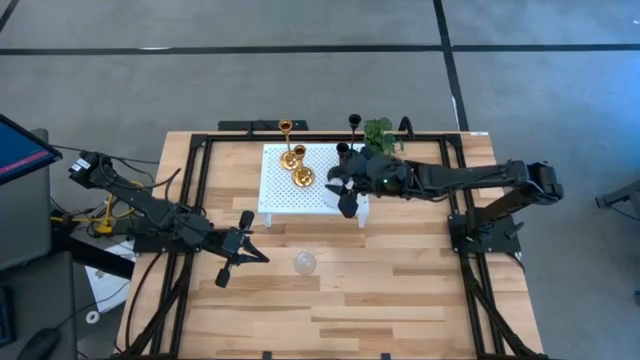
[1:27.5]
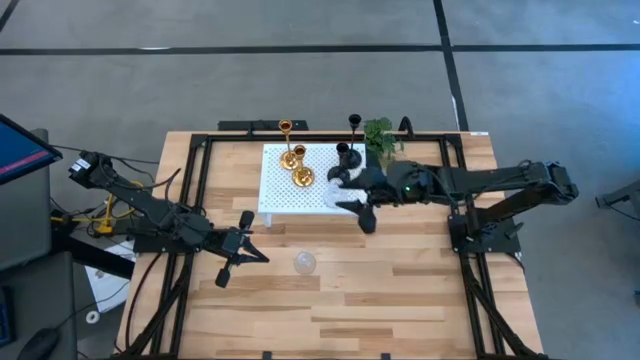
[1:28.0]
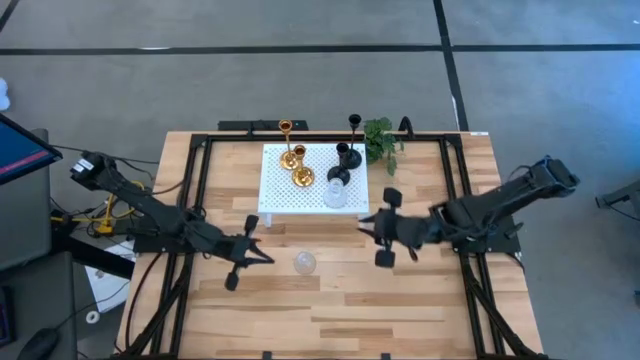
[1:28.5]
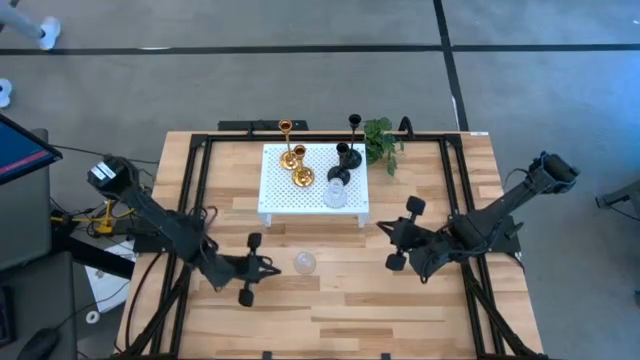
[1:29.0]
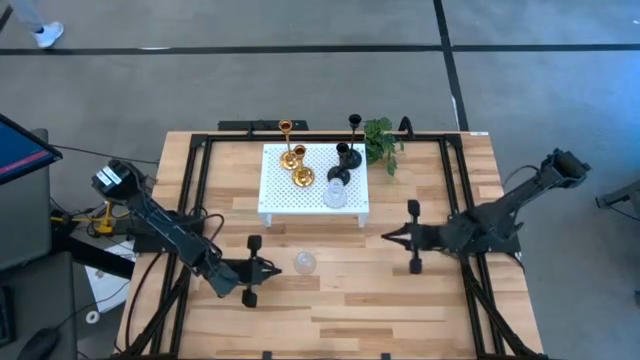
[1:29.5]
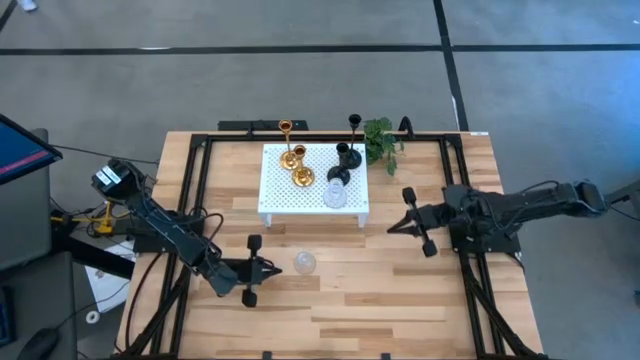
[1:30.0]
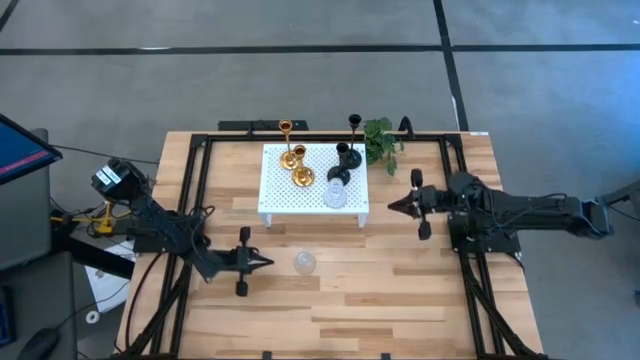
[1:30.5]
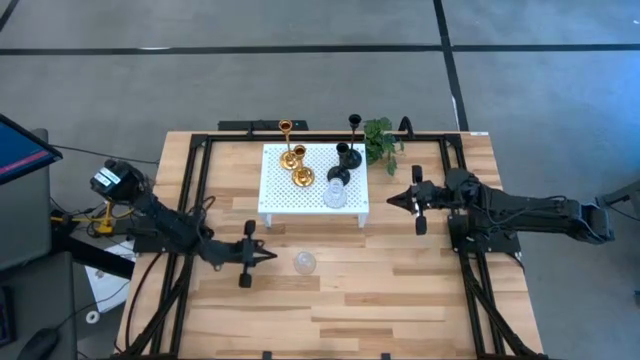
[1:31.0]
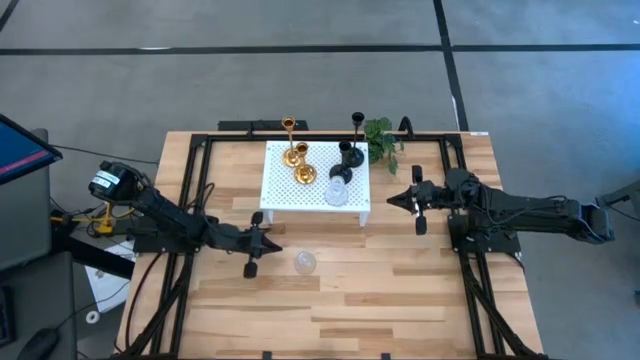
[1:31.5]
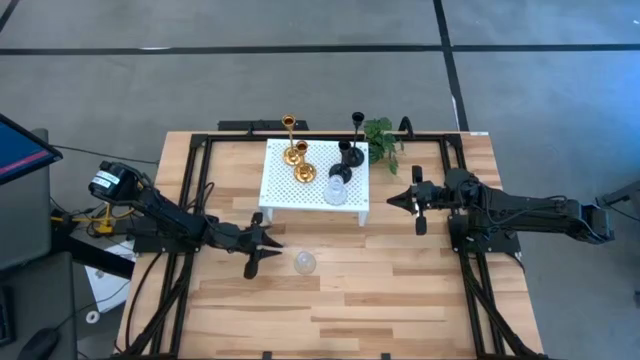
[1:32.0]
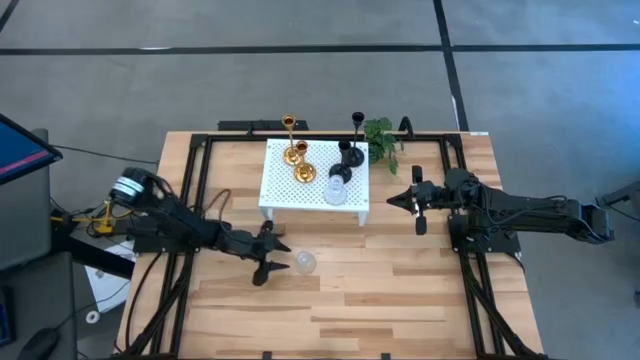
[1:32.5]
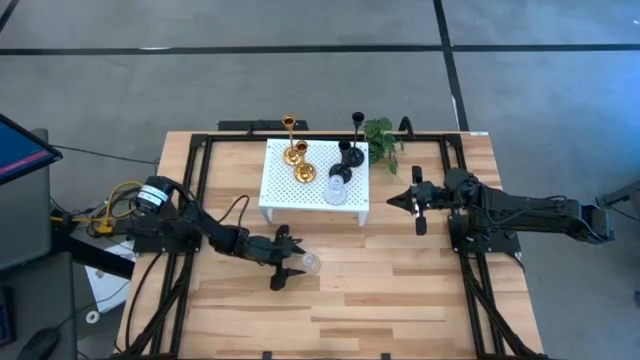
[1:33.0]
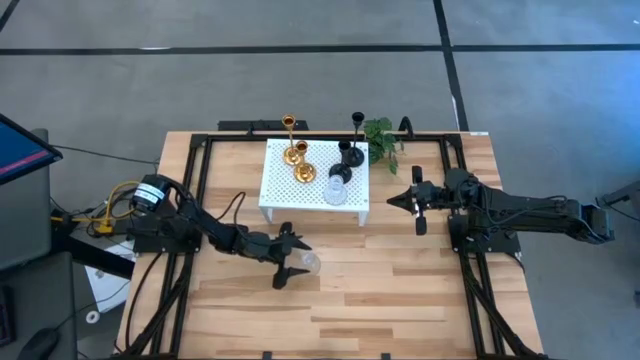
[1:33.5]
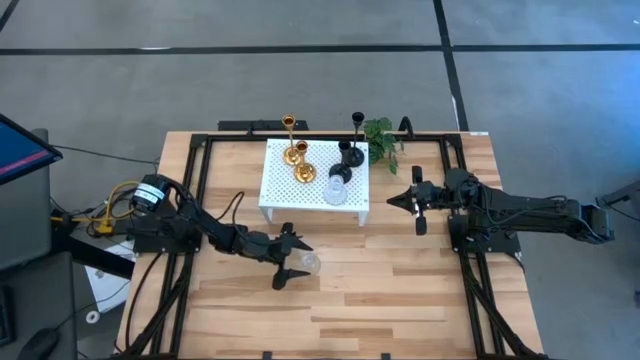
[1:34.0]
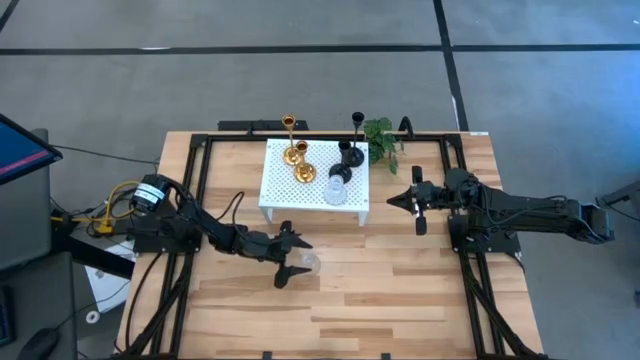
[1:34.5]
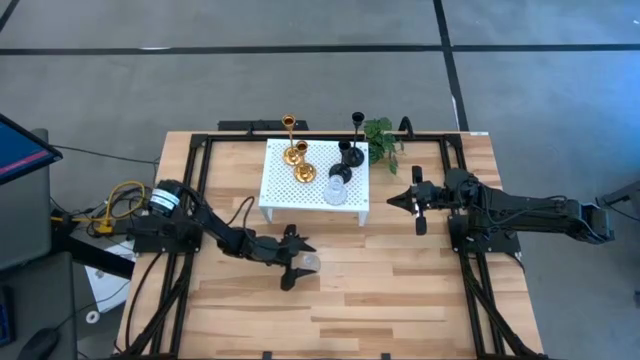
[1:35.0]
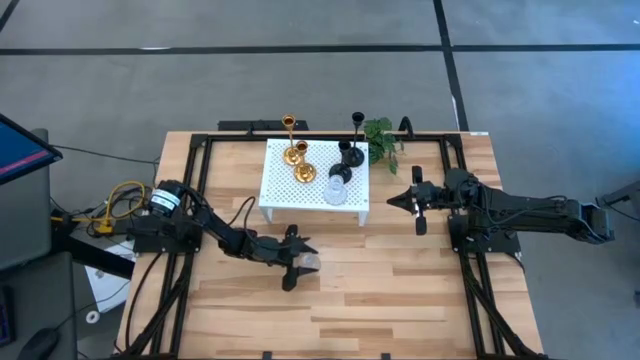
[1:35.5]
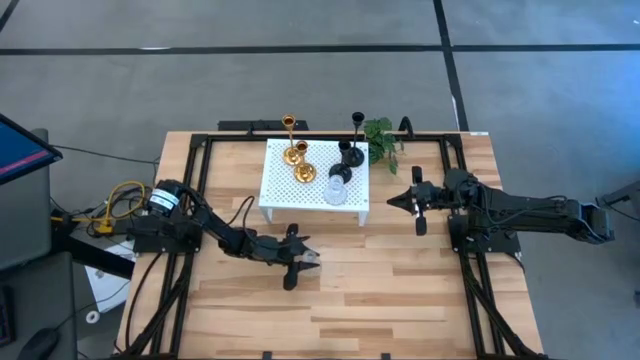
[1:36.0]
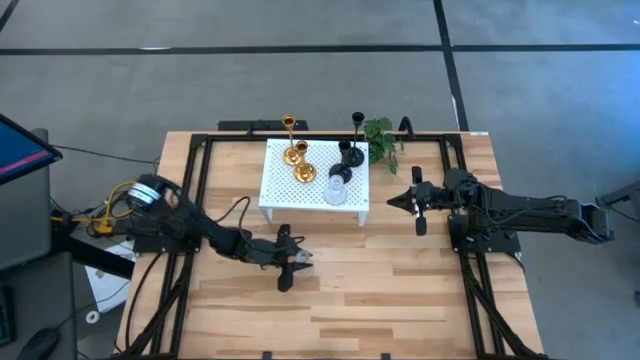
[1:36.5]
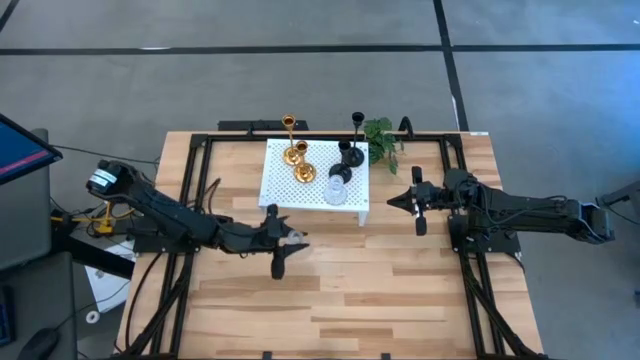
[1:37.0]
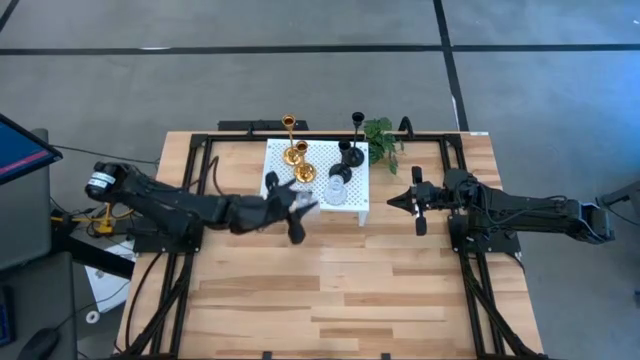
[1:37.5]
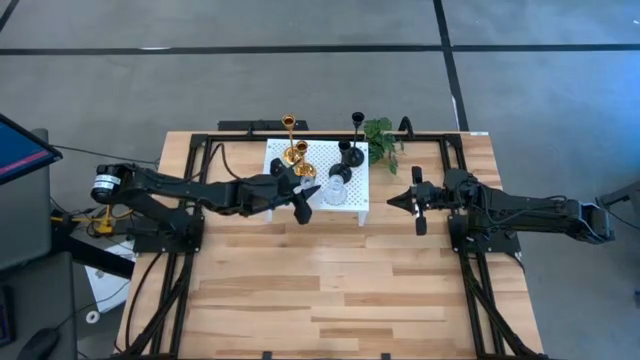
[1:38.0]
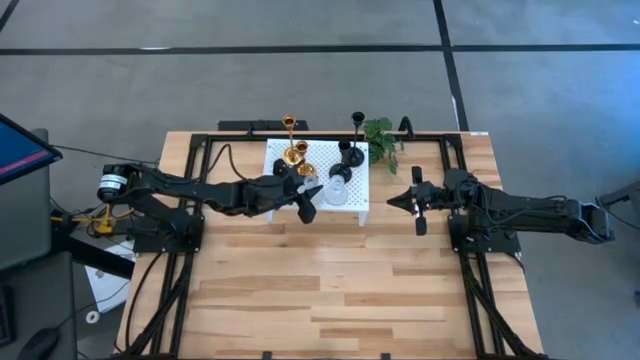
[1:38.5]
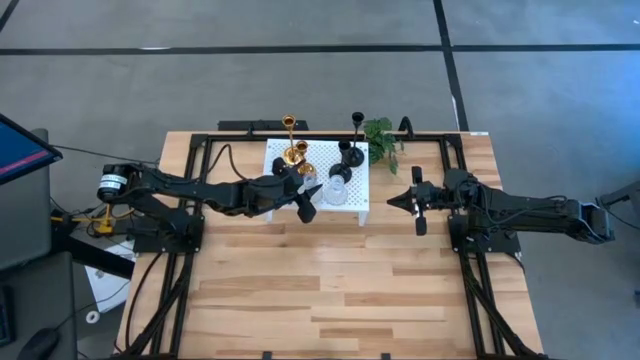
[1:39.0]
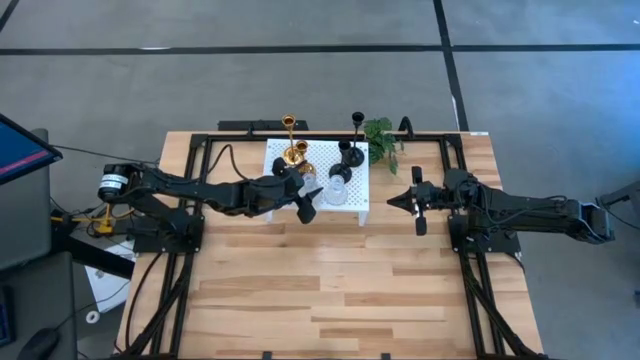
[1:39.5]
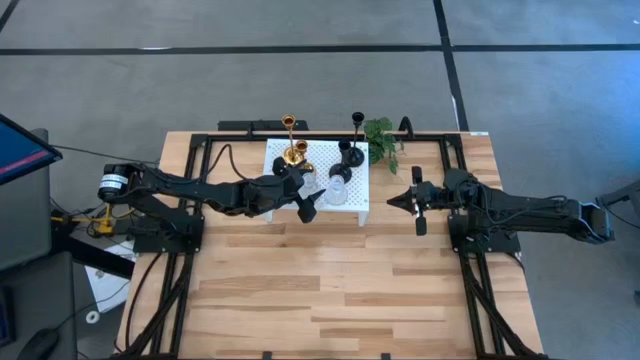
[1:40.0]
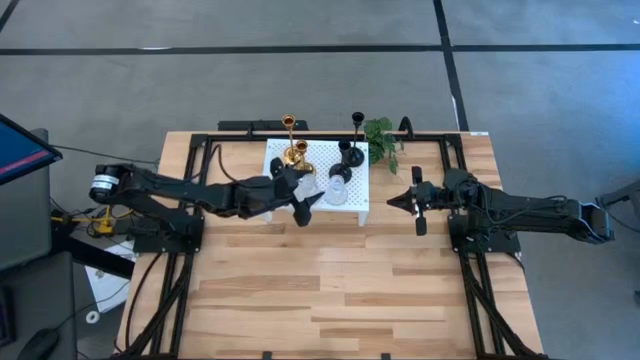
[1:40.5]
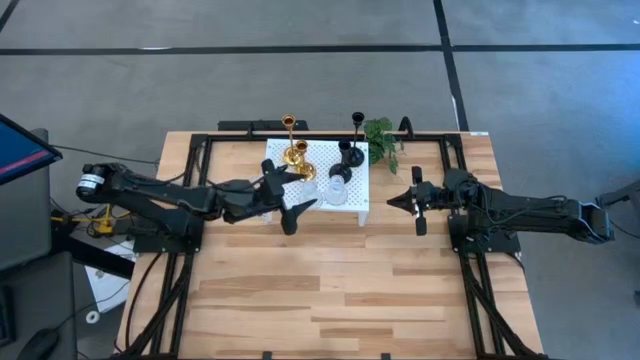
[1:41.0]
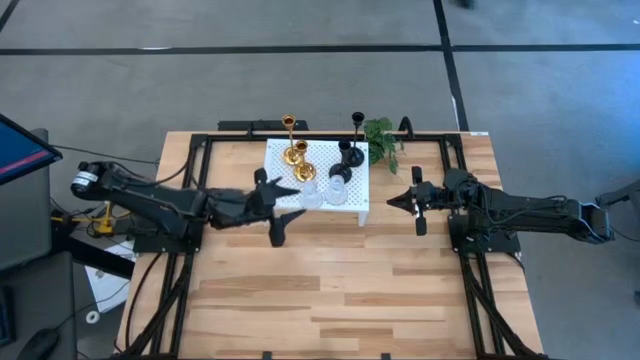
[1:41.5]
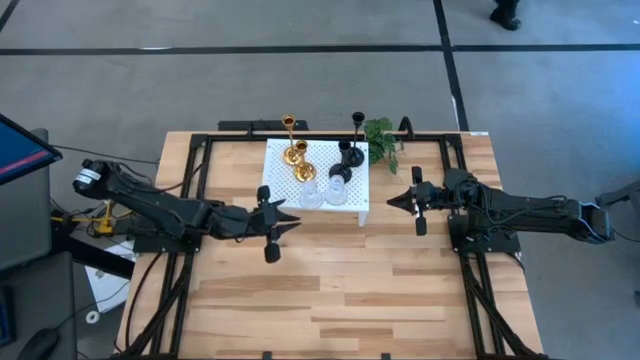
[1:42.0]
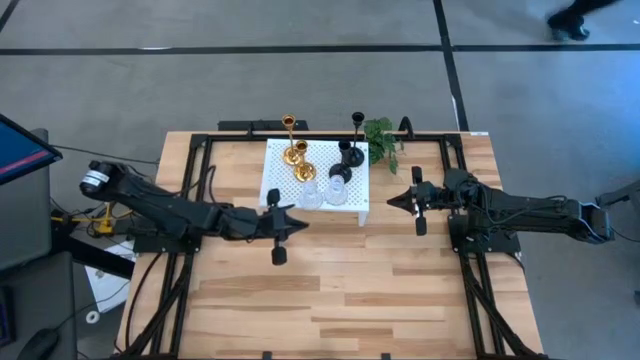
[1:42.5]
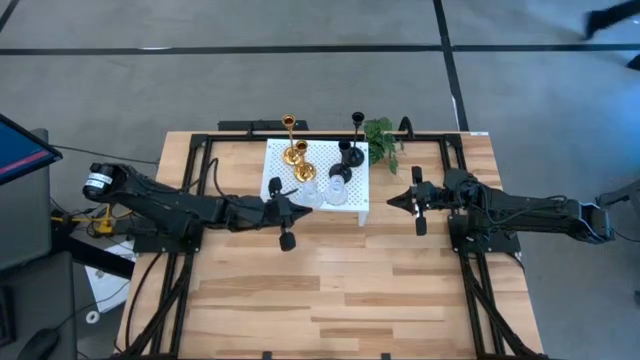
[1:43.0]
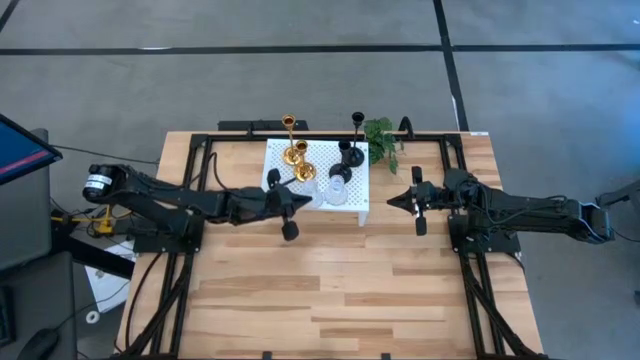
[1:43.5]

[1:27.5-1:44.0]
Task: Pick & Place candle stick holders
Put the transparent glass candle holder on the shelf

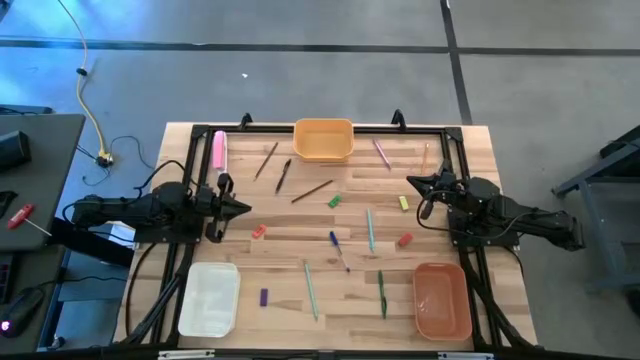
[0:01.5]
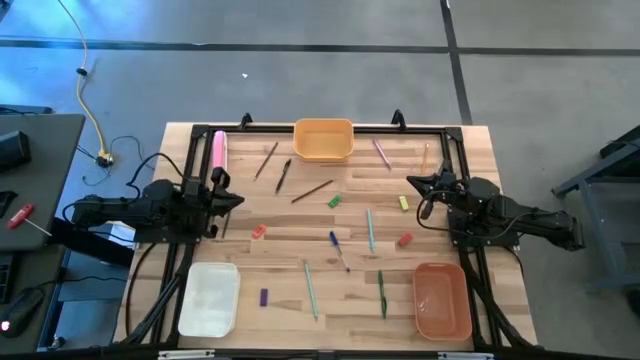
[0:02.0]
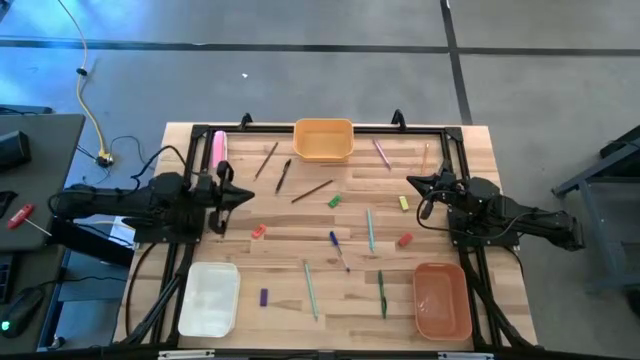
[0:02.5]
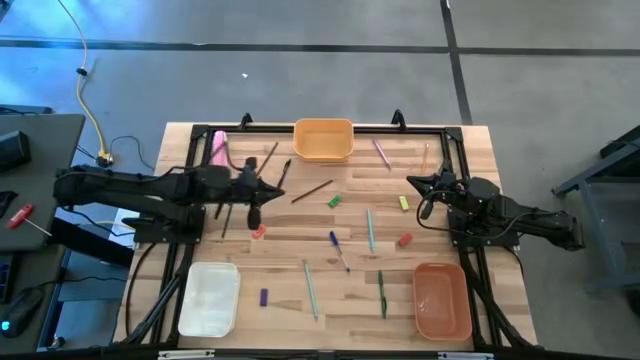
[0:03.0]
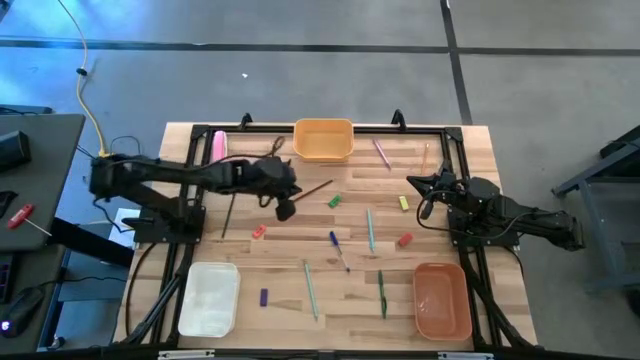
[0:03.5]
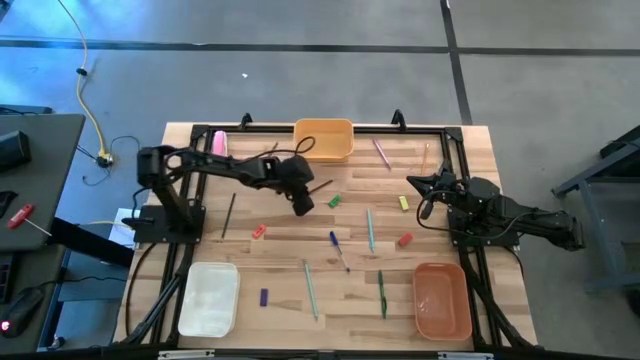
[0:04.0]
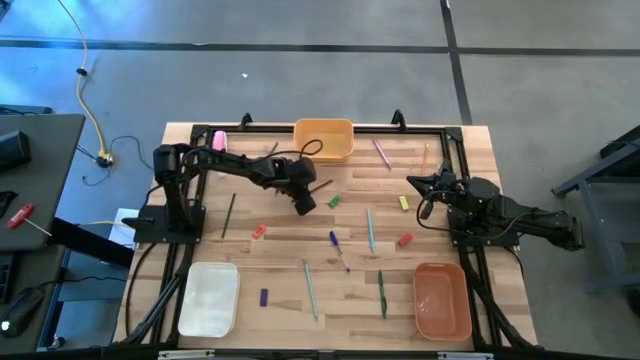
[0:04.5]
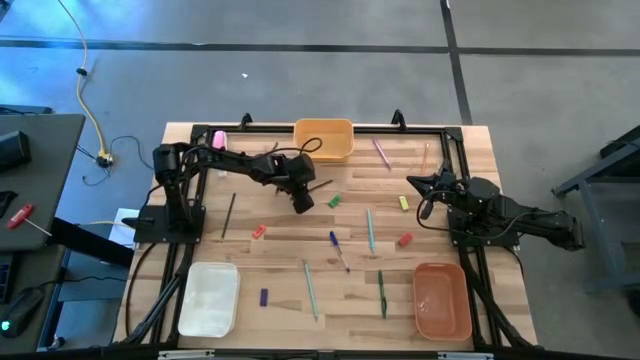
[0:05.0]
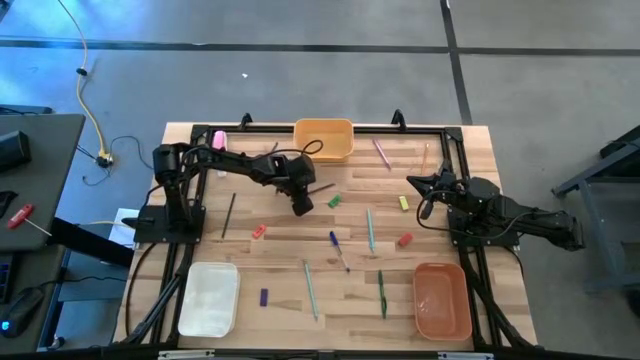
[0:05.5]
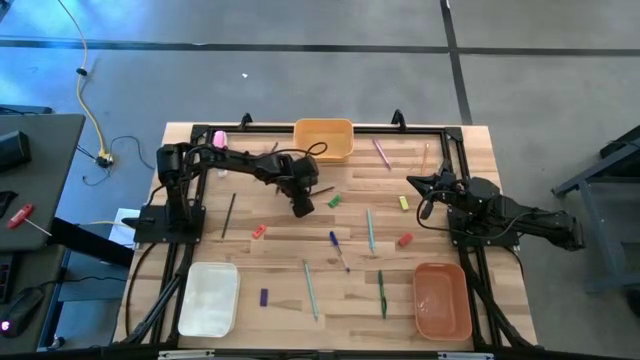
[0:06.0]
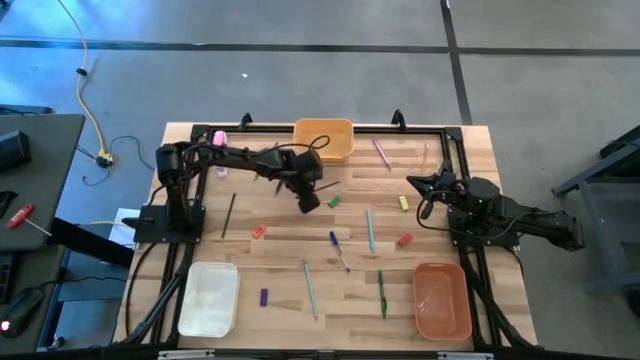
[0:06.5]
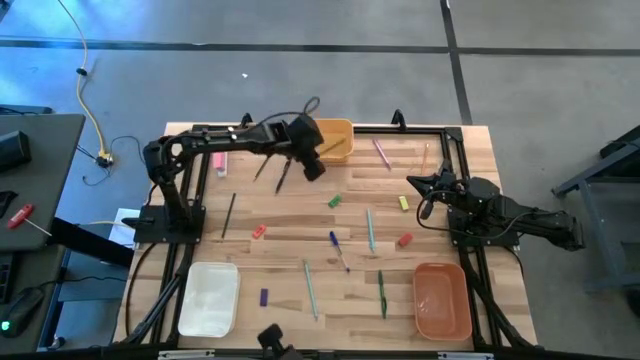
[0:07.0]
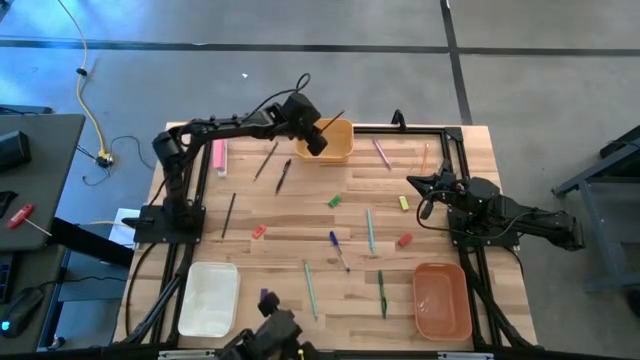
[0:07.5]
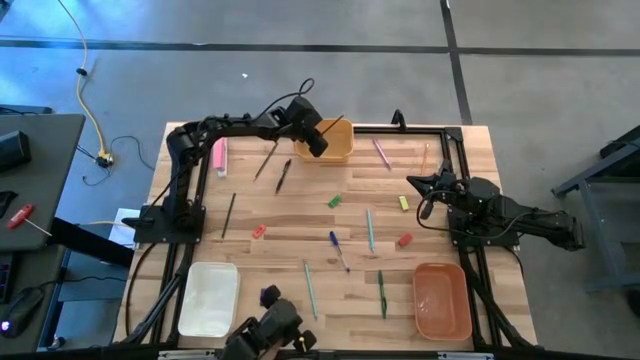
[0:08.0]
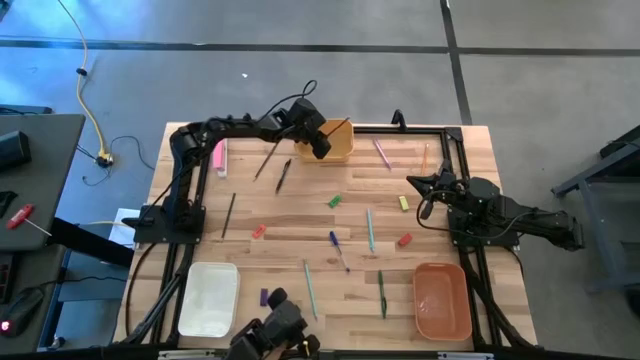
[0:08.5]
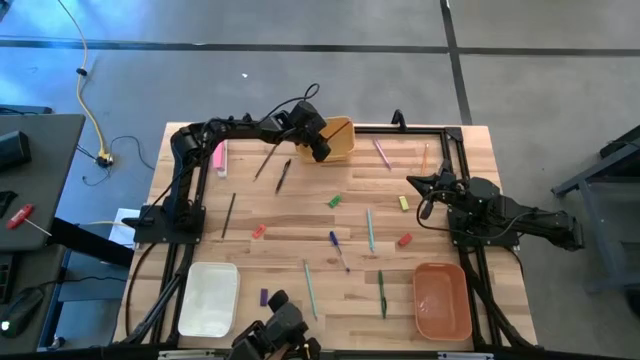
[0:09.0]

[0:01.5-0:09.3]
Task: Sort crayons/erasers/pens/pencils in bins
Put the brown pencil into the yellow bin
